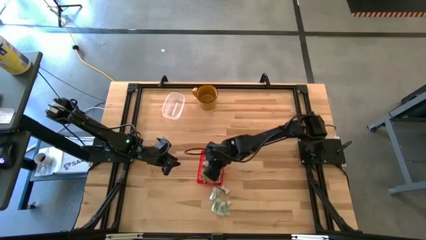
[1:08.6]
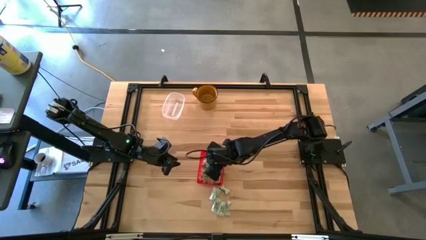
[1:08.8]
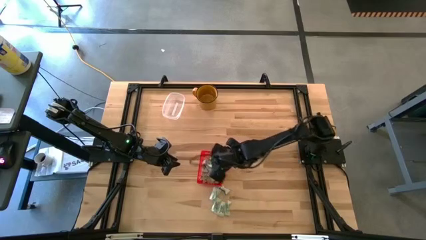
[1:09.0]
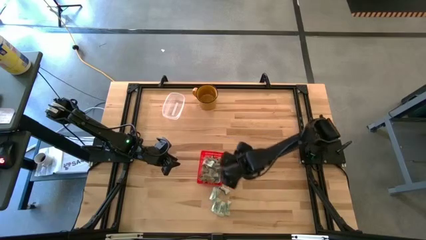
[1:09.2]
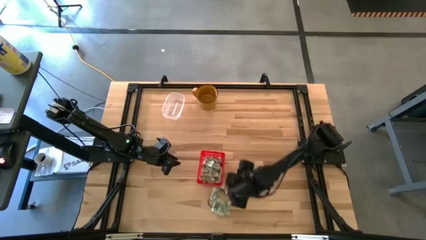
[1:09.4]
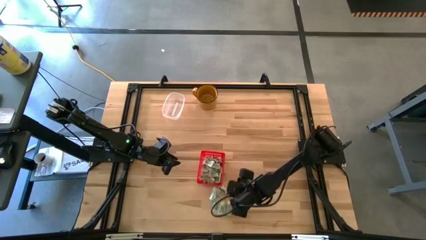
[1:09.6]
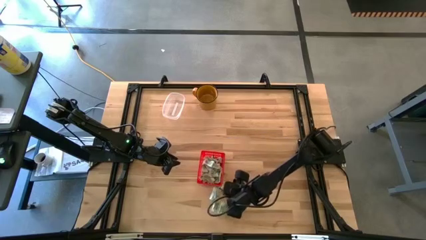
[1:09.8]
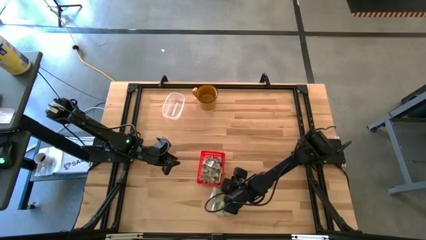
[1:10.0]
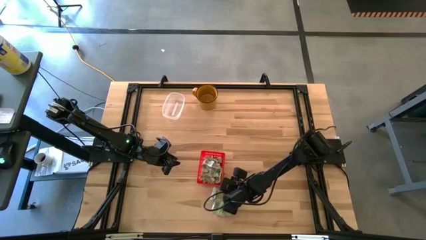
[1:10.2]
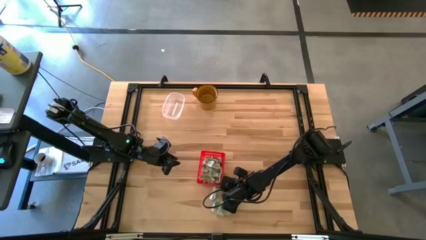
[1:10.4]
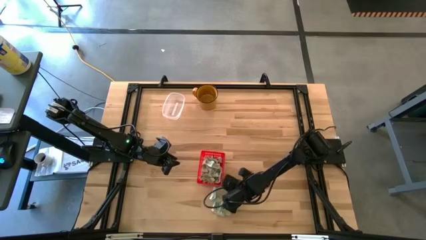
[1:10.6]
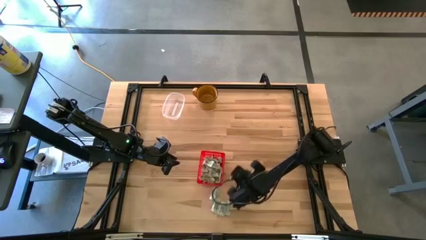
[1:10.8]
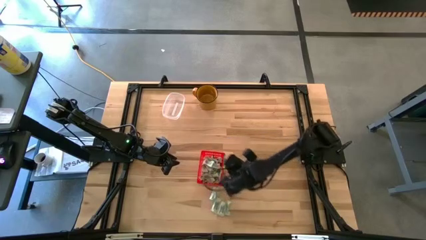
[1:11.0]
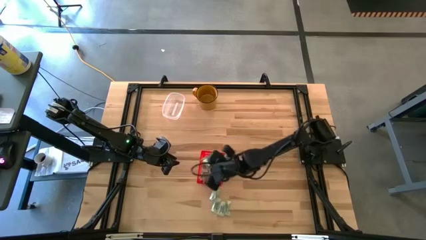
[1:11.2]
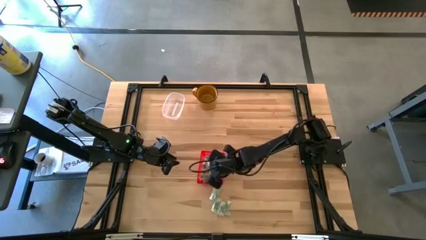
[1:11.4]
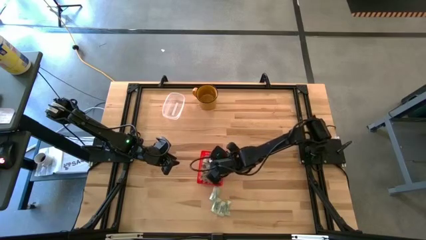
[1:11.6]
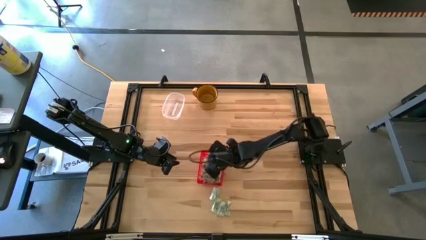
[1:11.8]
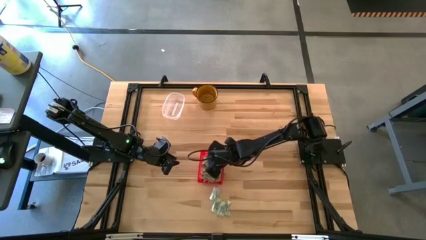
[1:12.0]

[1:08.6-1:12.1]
Task: Pick and place Stevia / Truvia into bins
Put the green stevia packet into the red basket

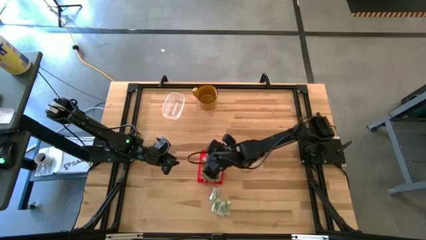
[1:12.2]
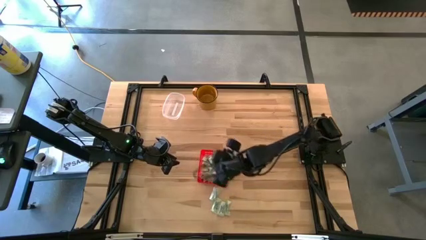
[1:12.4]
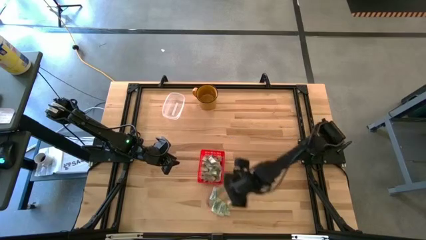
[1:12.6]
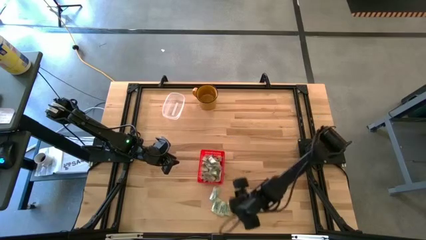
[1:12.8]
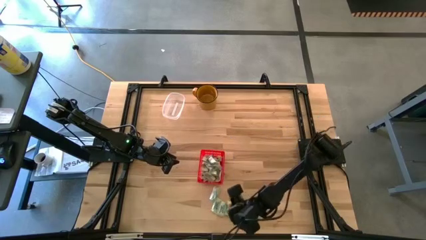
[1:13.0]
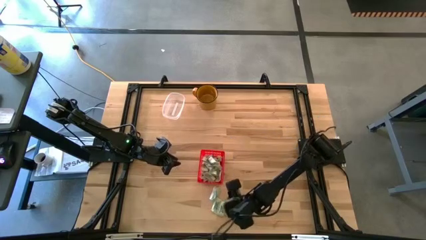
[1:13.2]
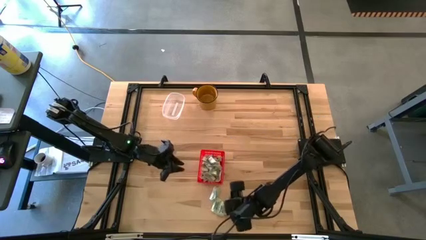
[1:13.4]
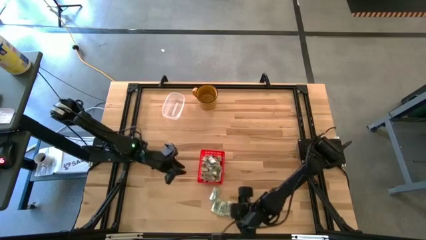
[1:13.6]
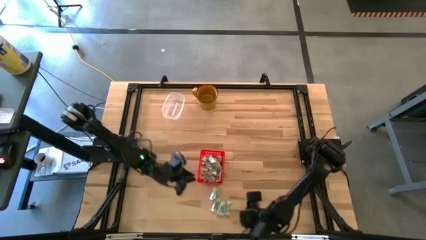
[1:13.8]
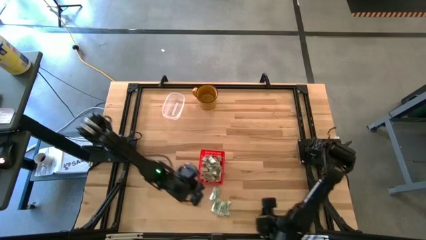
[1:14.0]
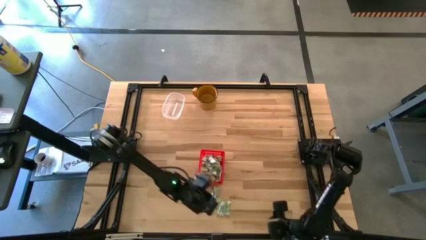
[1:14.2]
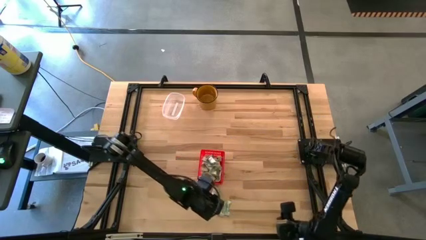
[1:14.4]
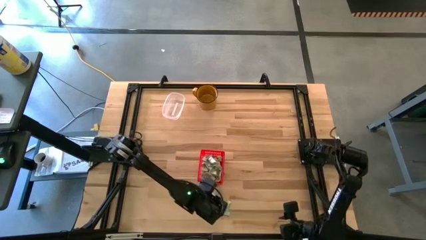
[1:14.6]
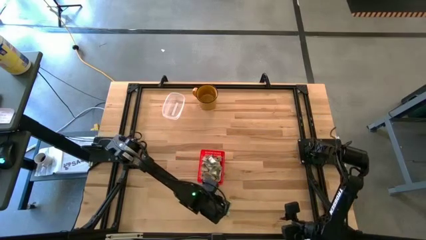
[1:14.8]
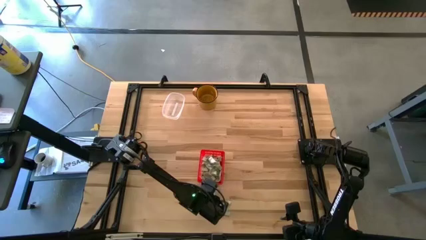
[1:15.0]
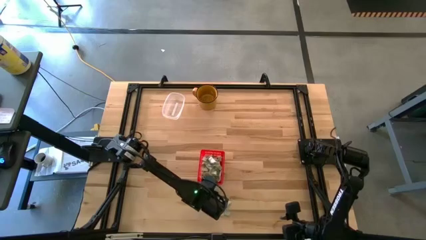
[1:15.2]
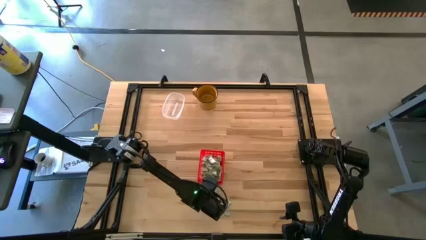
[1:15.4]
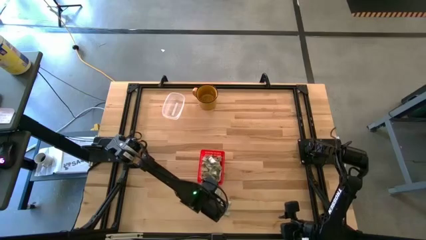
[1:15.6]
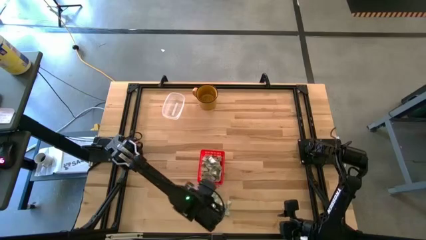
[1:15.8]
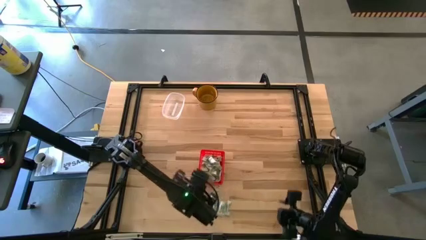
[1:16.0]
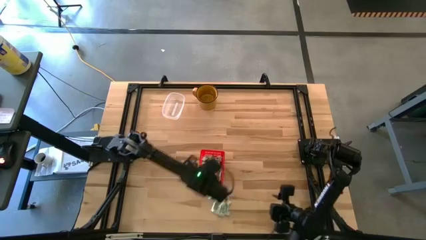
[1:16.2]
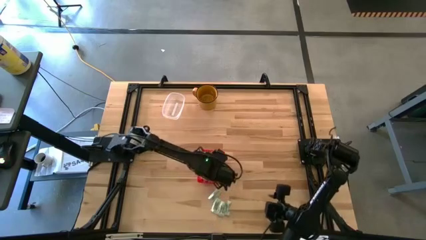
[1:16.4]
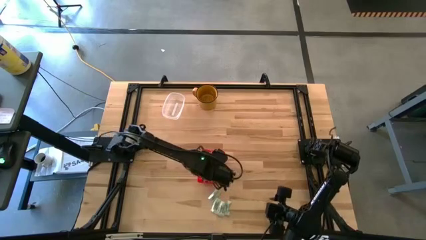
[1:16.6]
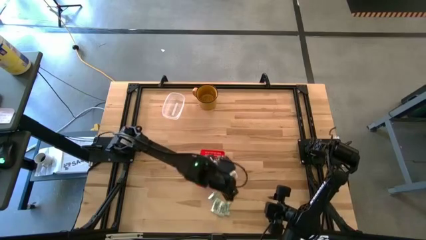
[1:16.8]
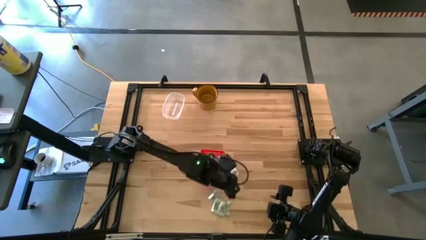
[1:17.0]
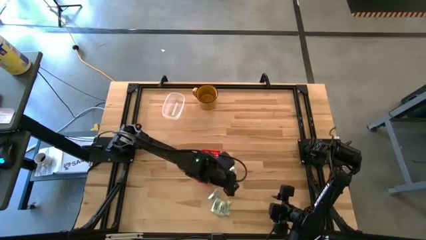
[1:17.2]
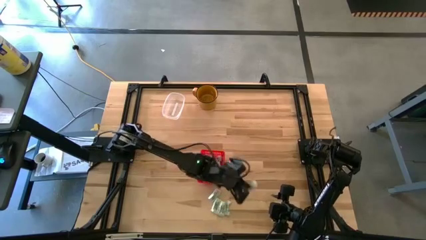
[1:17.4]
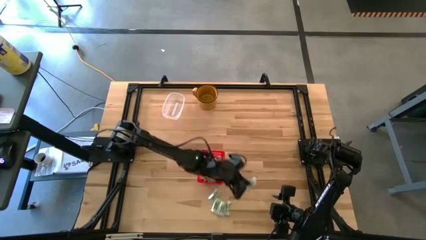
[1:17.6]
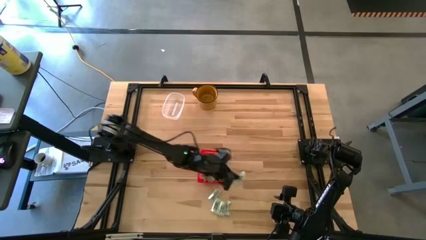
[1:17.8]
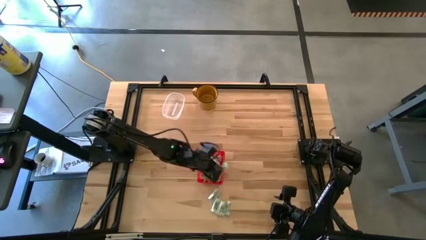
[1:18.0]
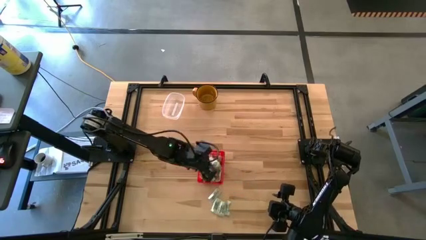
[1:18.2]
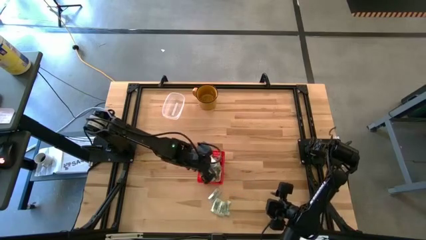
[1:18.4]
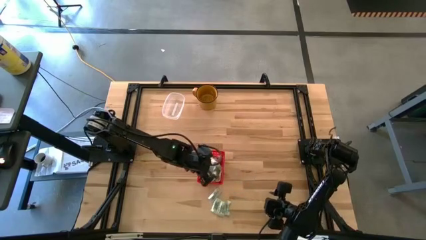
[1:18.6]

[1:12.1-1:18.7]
Put the white stevia packet into the red basket

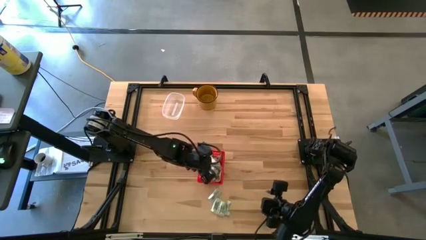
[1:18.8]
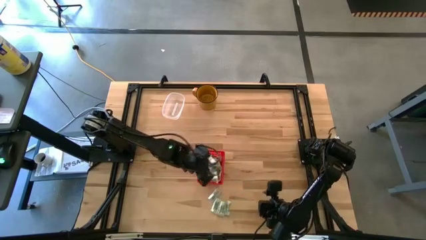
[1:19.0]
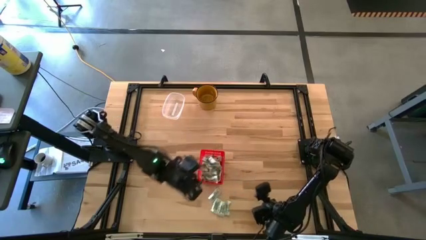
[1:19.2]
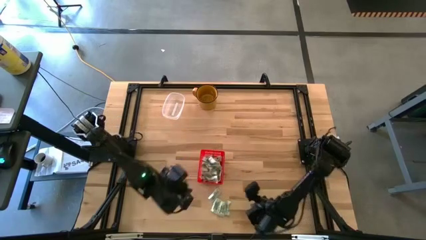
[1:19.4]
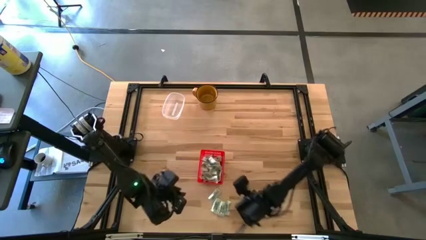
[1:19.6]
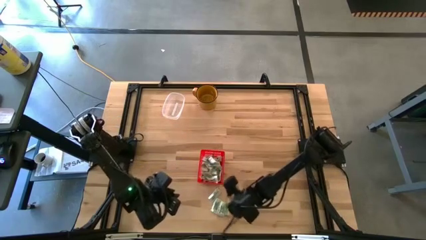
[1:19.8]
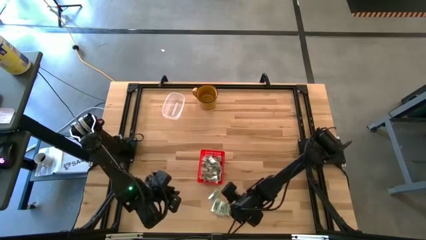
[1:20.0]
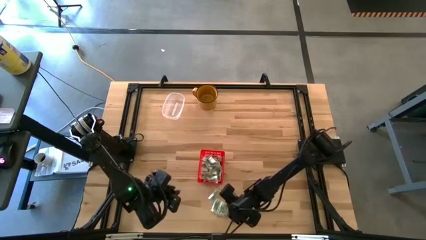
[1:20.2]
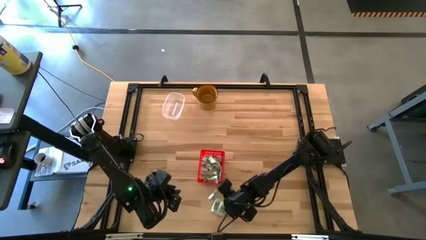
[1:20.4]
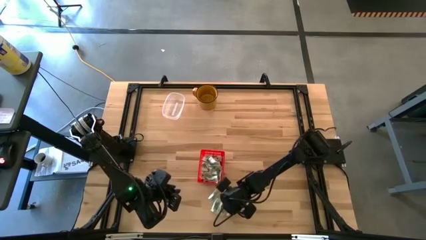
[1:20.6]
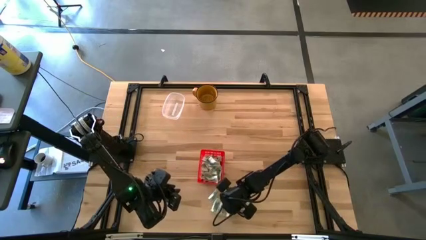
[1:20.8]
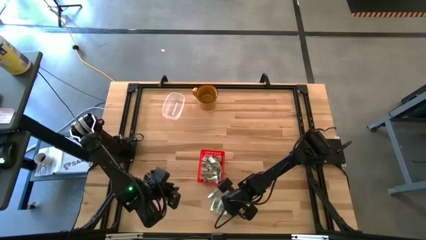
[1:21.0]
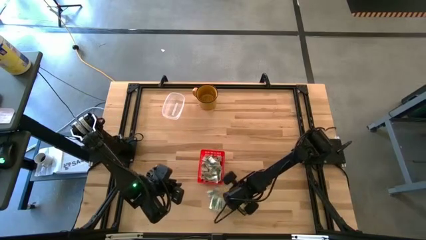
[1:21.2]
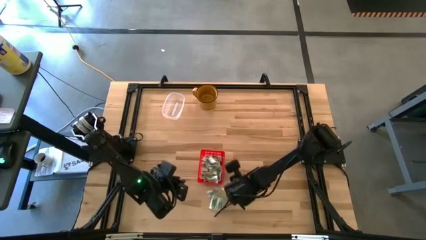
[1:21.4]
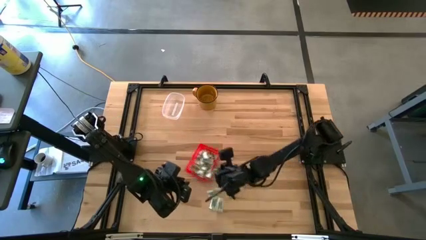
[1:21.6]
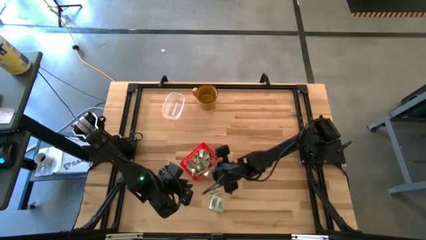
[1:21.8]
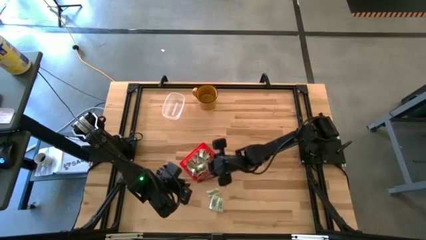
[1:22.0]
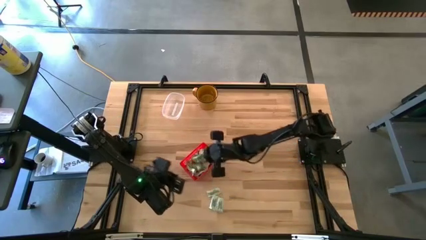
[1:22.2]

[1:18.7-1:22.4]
Put the white stevia packet into the red basket

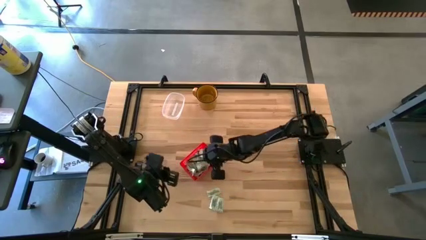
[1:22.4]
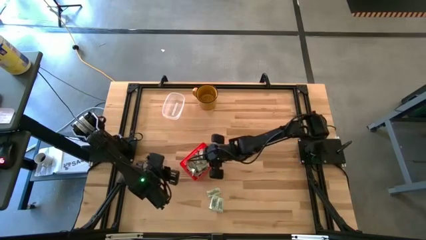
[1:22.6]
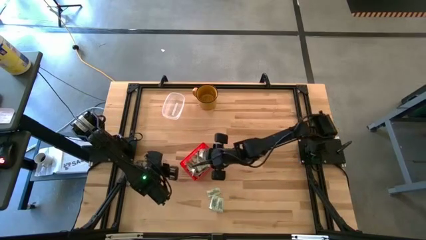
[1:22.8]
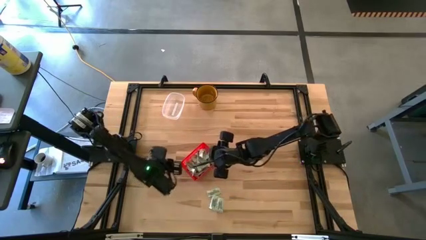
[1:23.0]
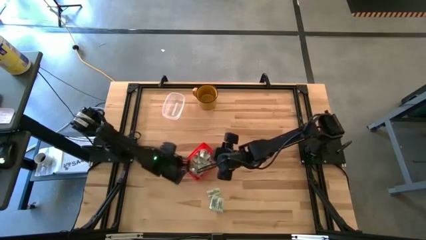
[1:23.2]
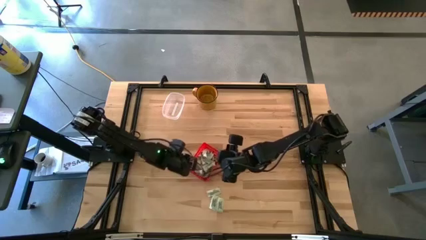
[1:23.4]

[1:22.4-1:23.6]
Adjust the red basket

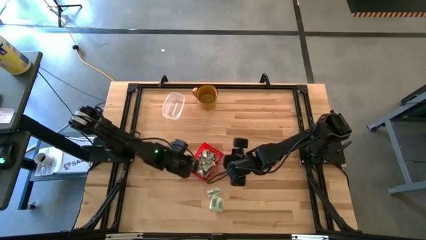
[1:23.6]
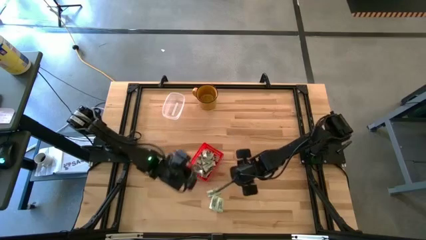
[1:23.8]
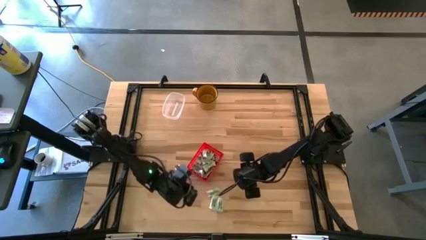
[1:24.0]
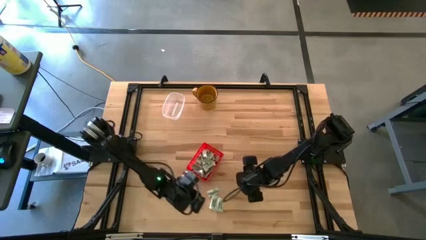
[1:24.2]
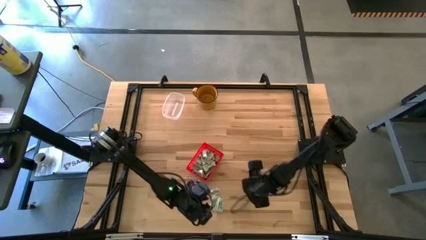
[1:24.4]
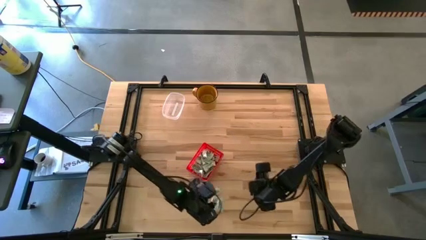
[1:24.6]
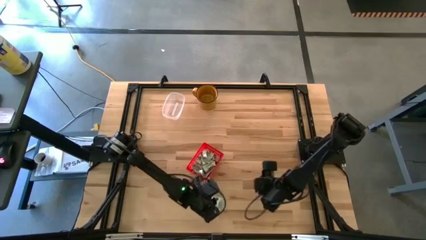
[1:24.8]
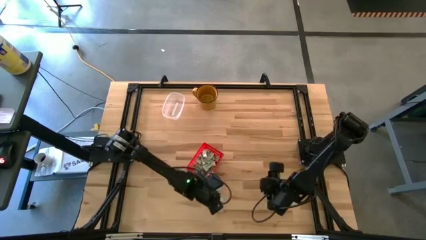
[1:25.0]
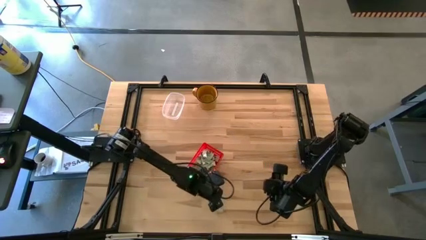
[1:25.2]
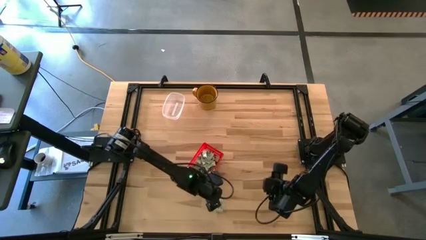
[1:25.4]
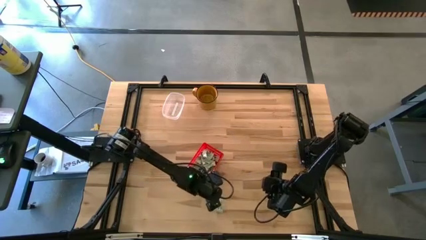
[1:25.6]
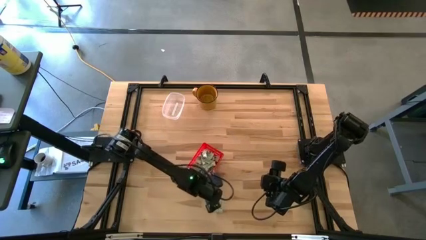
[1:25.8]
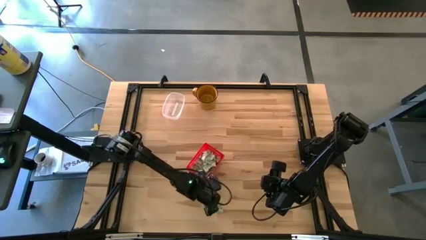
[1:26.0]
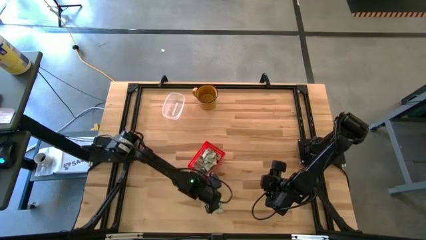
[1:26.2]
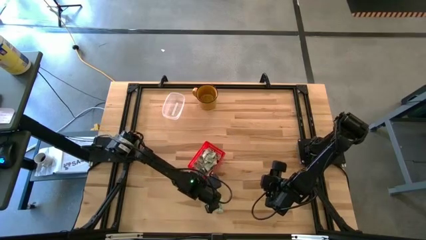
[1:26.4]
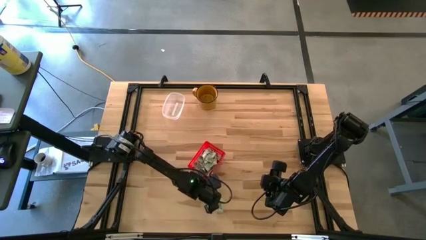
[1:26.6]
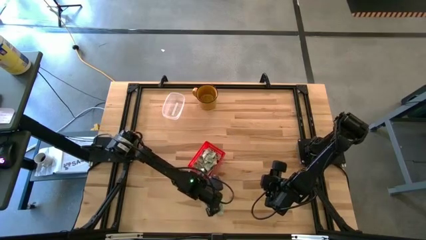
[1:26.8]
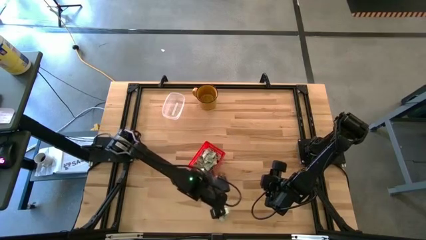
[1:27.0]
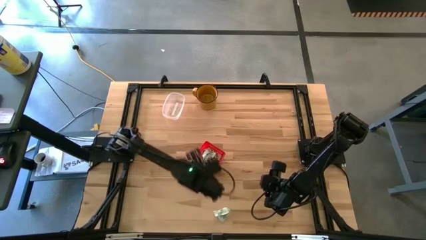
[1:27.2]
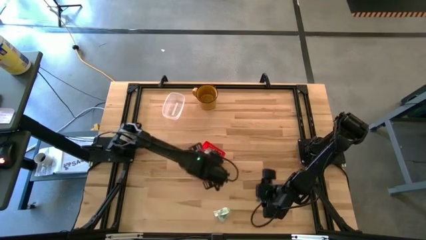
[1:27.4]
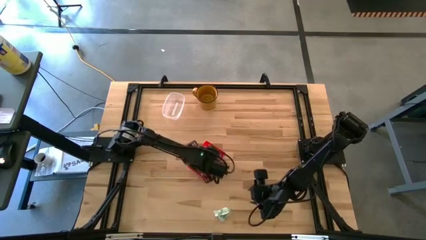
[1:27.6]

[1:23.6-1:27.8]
Put the white stevia packet into the red basket
